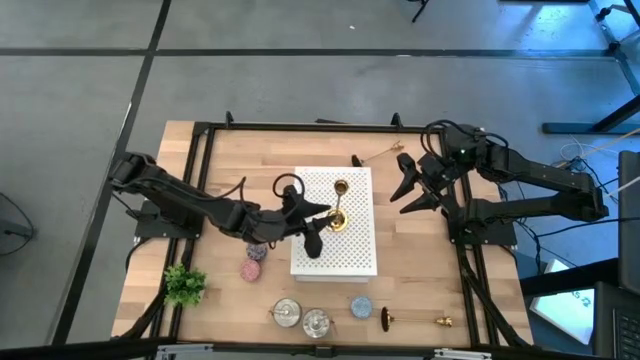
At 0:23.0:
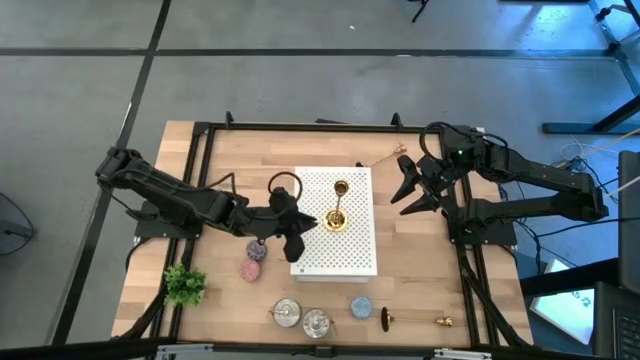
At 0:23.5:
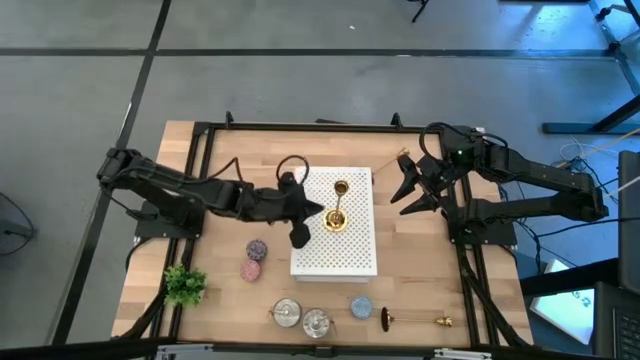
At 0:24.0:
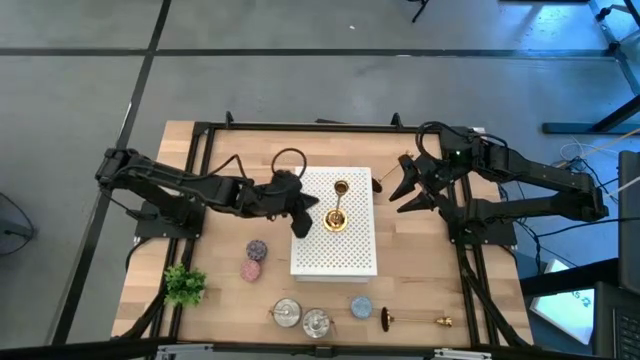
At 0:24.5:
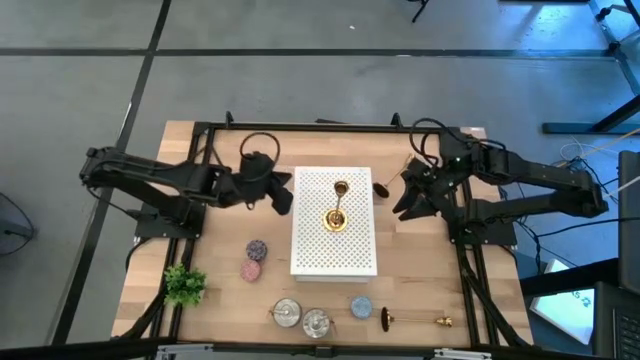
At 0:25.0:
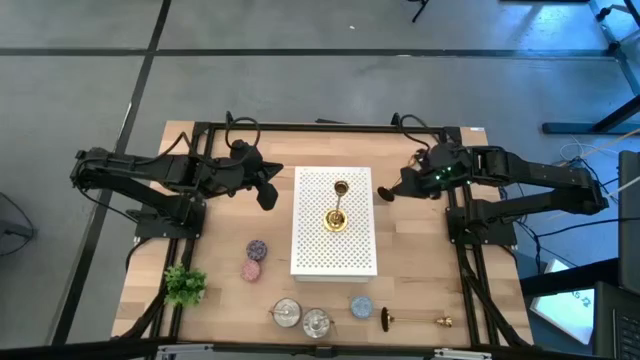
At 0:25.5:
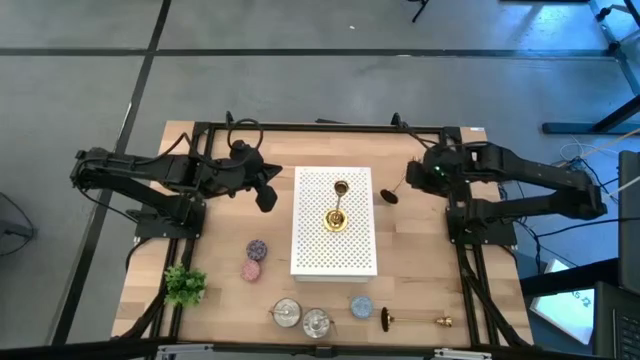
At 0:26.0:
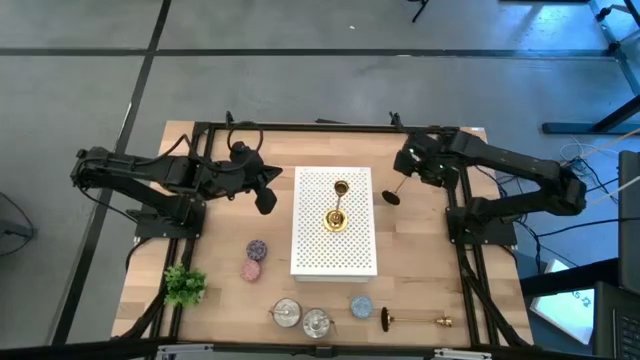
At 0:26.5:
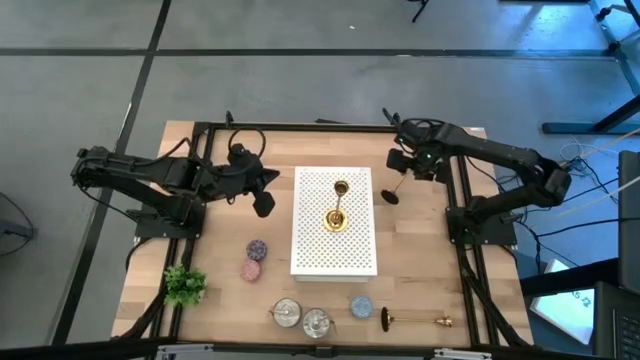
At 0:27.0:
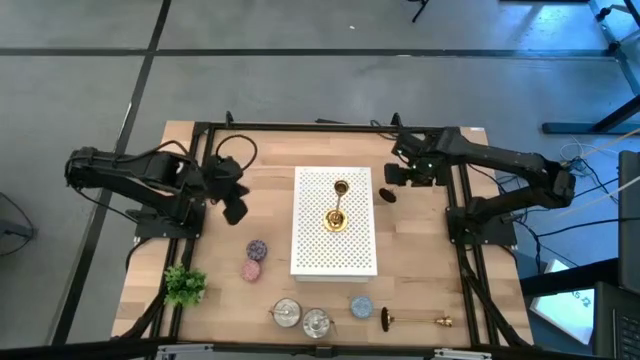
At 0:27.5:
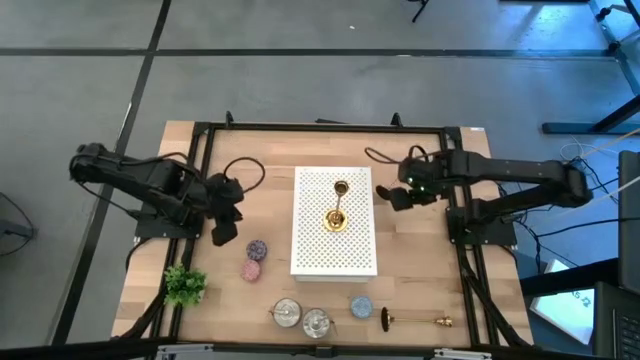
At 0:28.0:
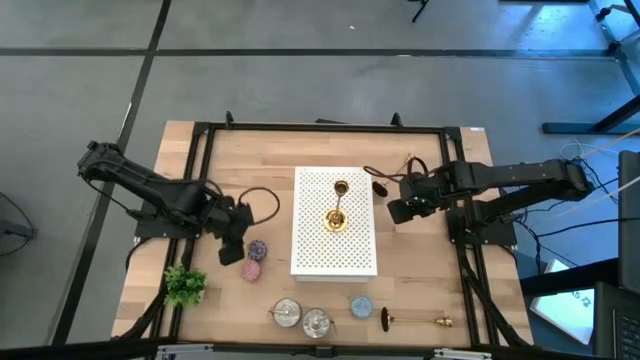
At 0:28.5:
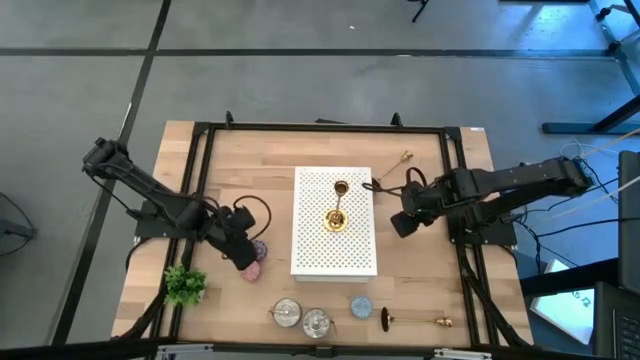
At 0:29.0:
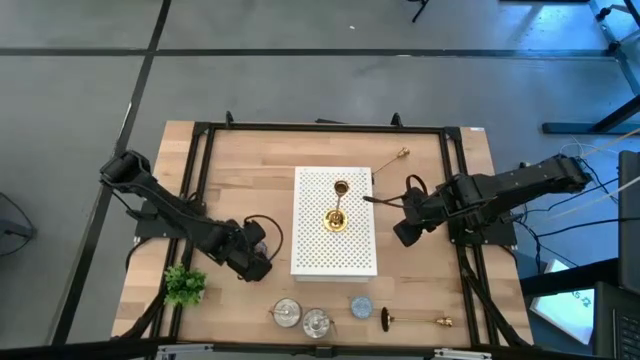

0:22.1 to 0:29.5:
Task: Pick & Place candle stick holders
Put the red patterned scented candle on the shelf

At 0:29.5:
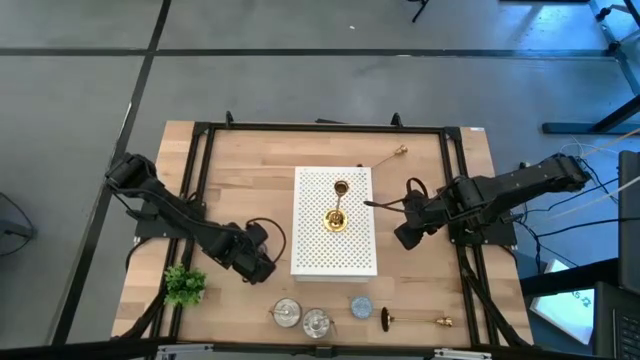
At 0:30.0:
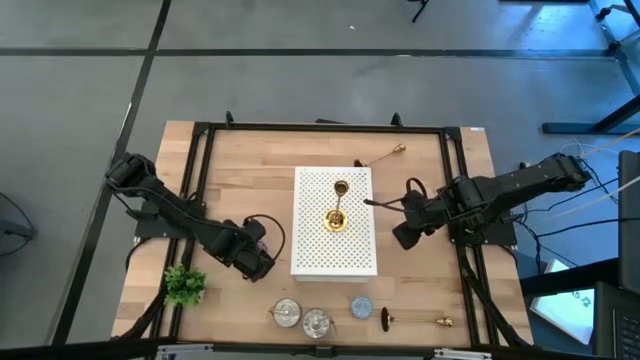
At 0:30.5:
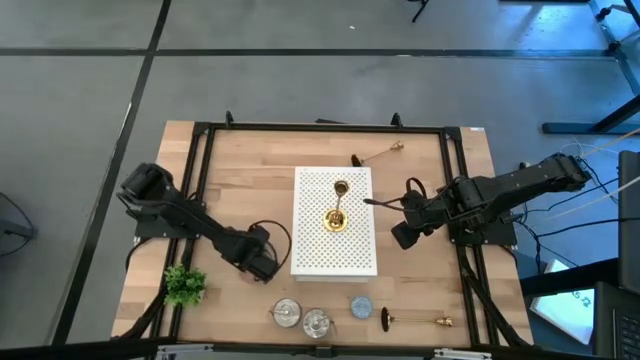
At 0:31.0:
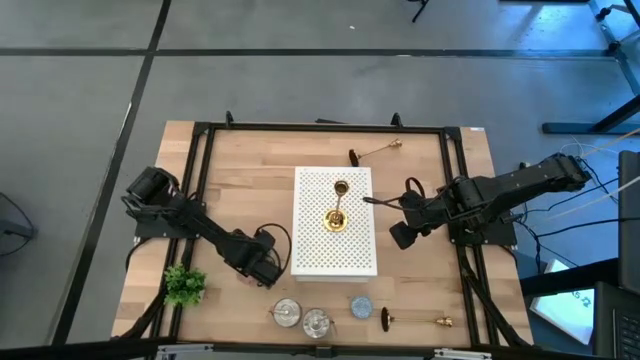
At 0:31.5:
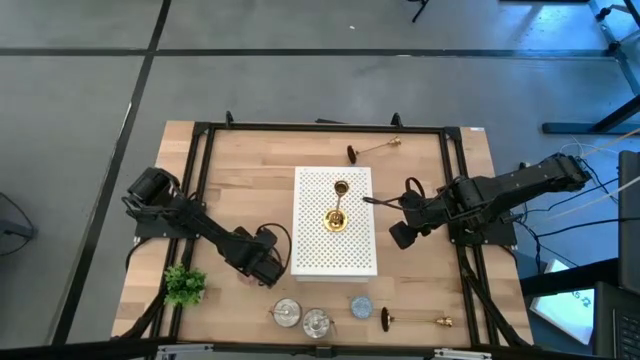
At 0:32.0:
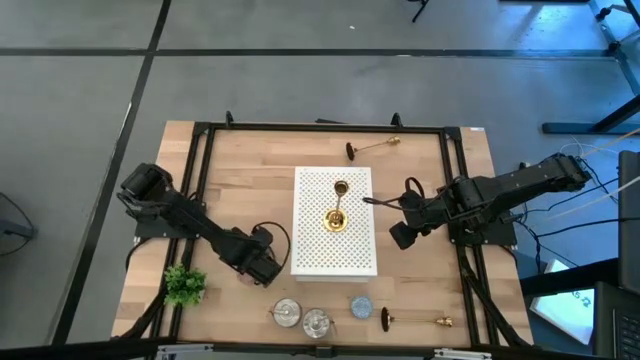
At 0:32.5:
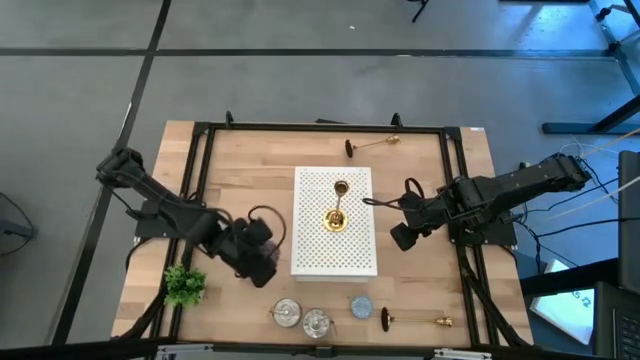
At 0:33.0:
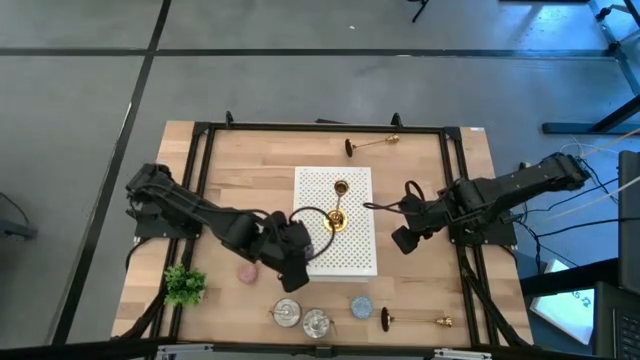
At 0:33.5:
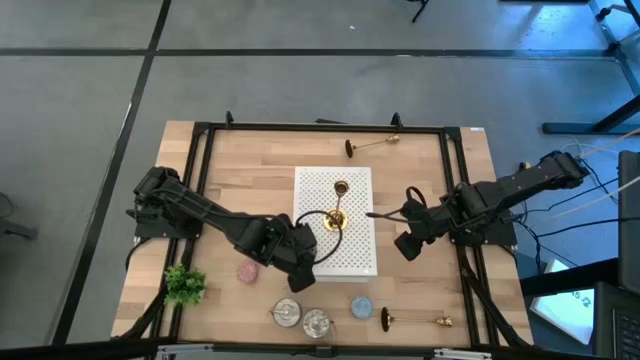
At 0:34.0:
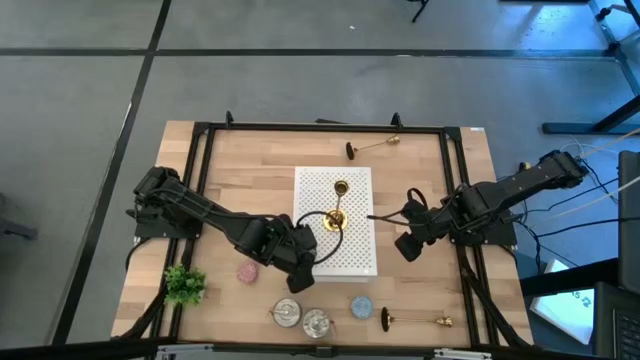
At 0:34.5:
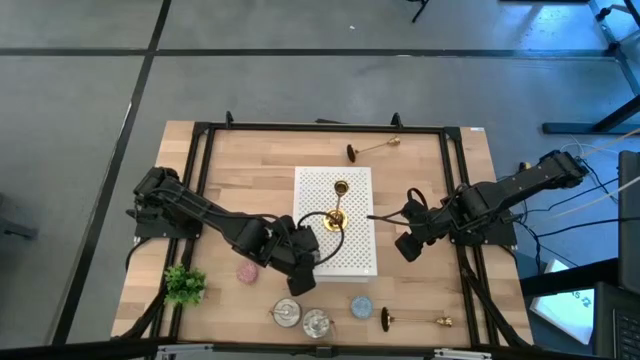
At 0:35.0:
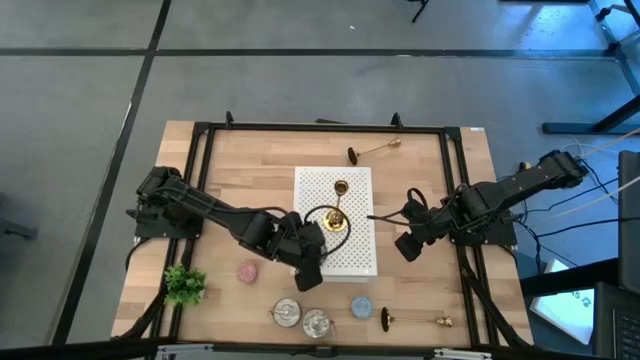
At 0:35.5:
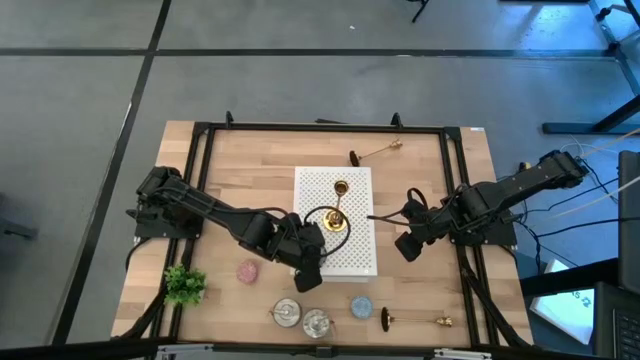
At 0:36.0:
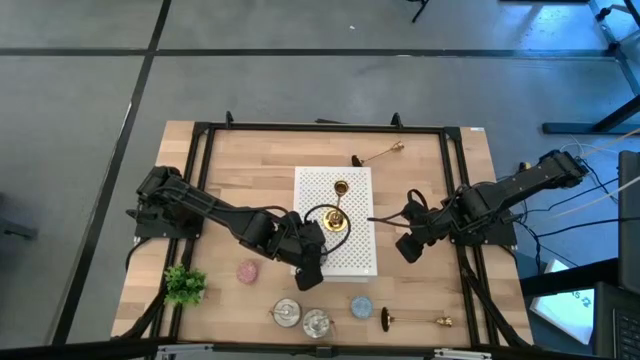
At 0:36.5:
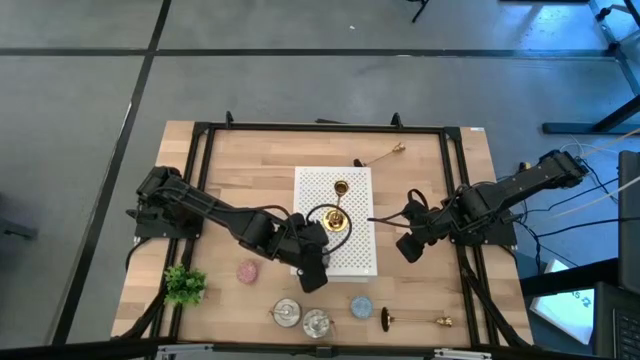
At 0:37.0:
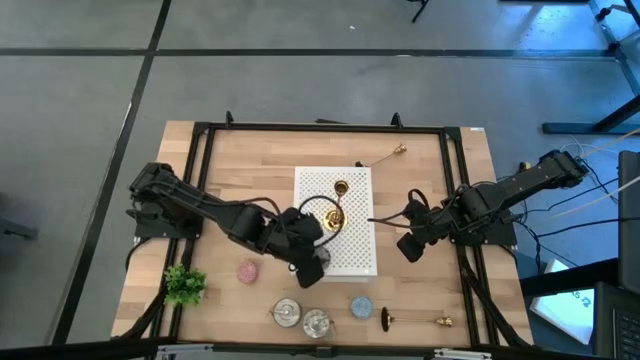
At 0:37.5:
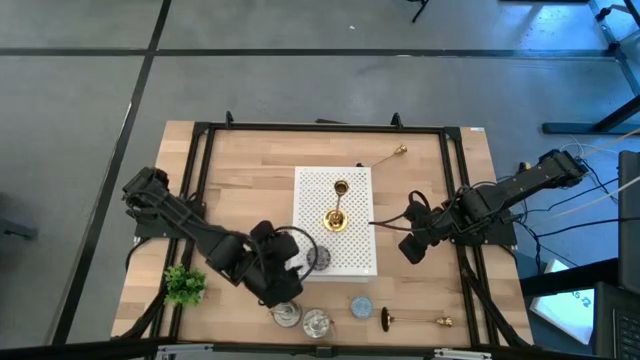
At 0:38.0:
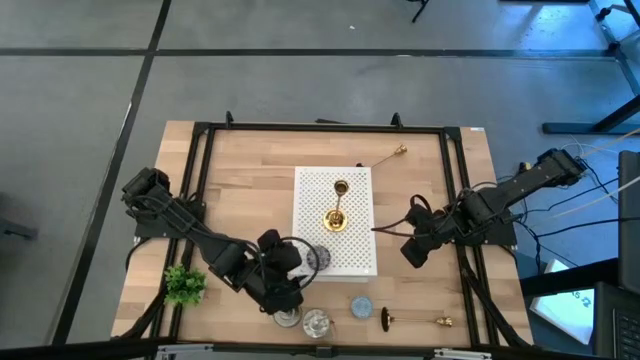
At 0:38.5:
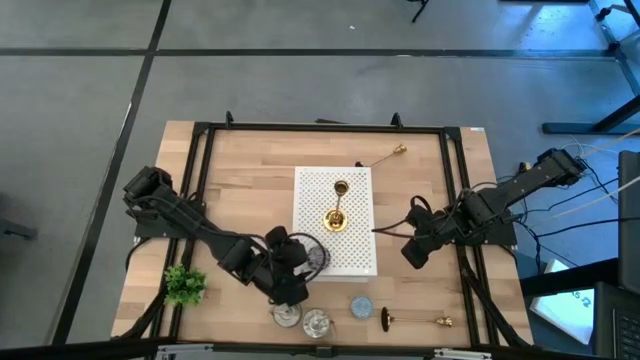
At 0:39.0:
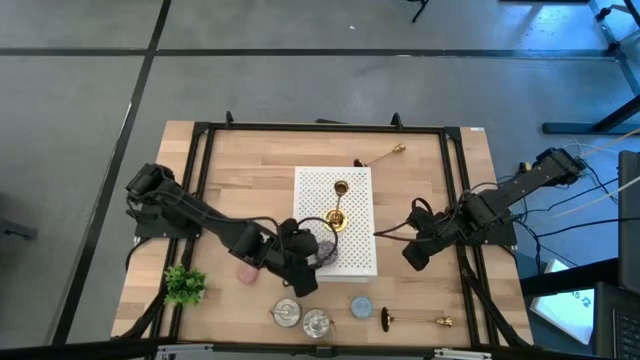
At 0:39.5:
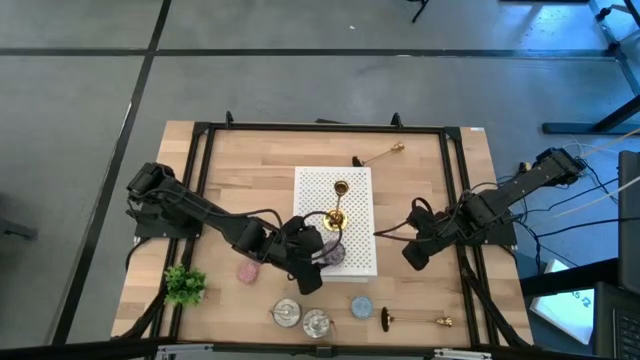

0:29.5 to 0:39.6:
Put the red patterned scented candle on the shelf

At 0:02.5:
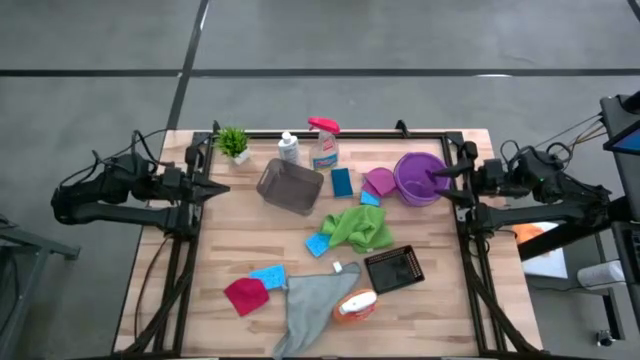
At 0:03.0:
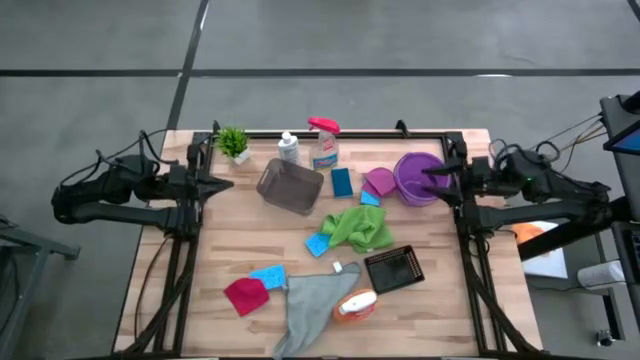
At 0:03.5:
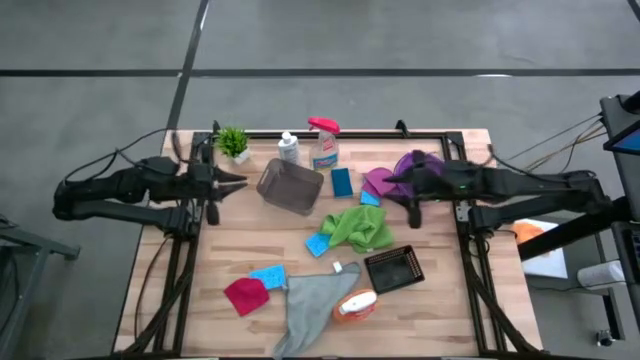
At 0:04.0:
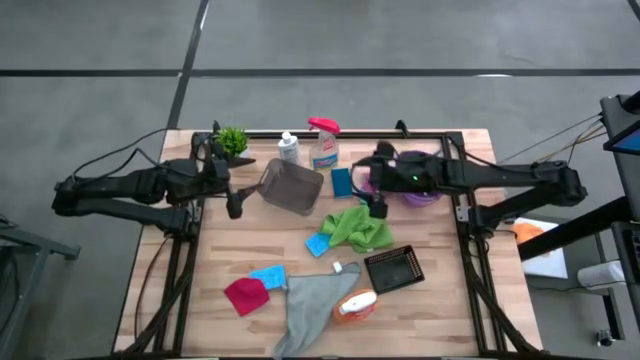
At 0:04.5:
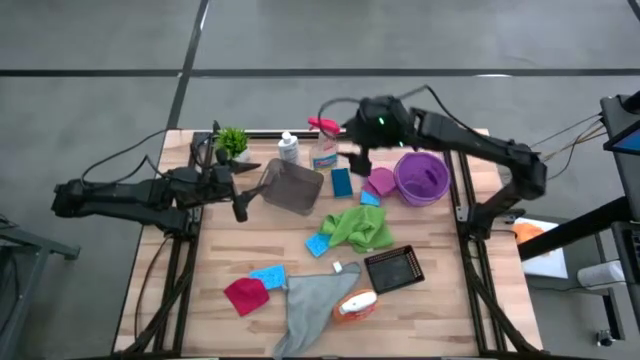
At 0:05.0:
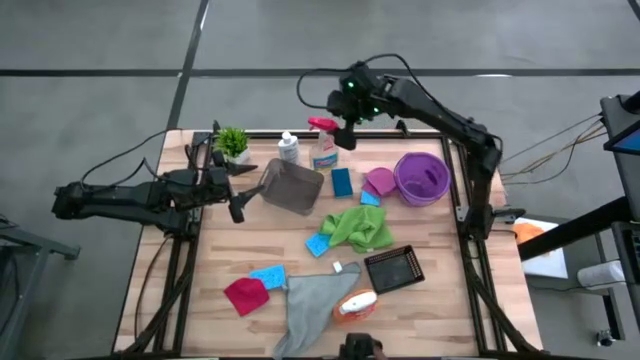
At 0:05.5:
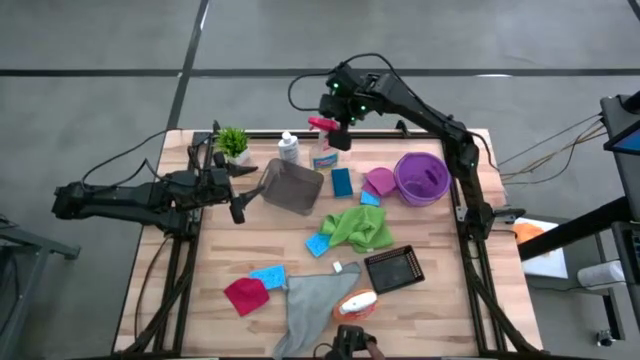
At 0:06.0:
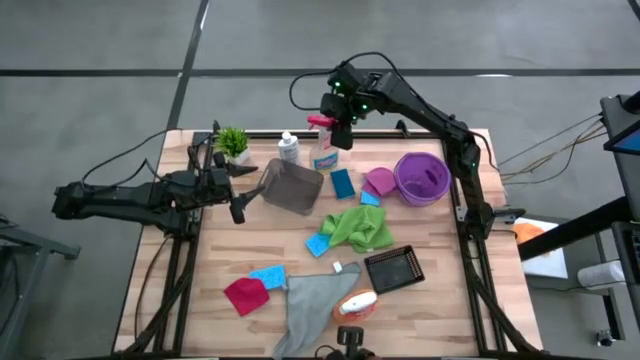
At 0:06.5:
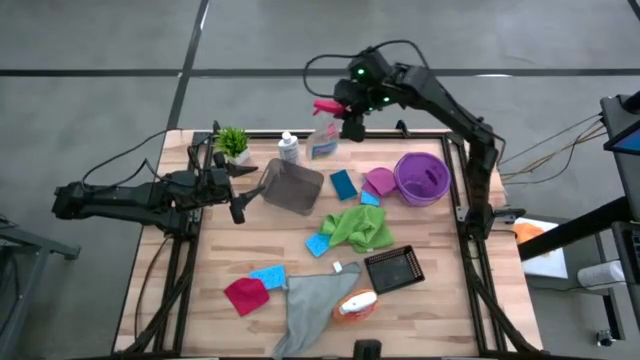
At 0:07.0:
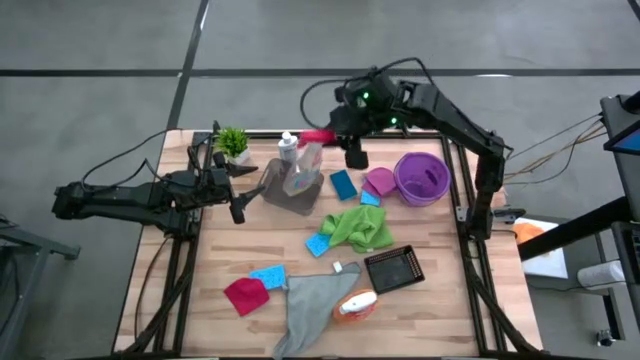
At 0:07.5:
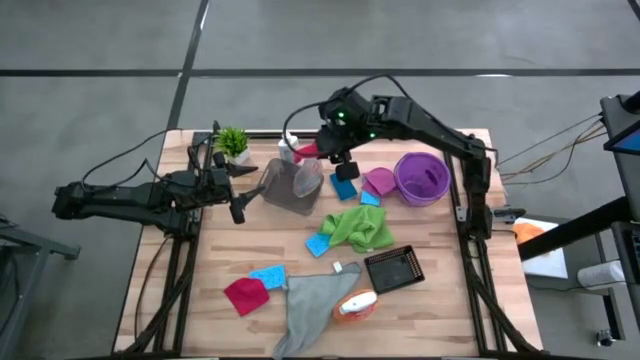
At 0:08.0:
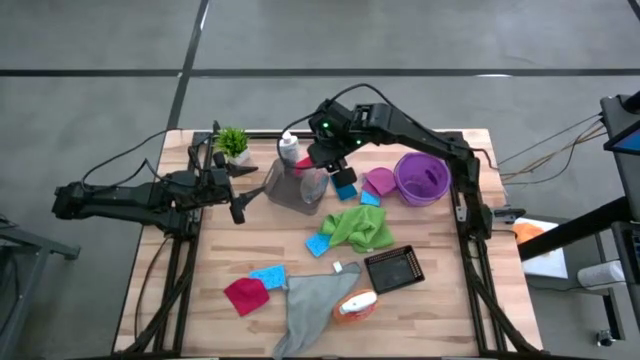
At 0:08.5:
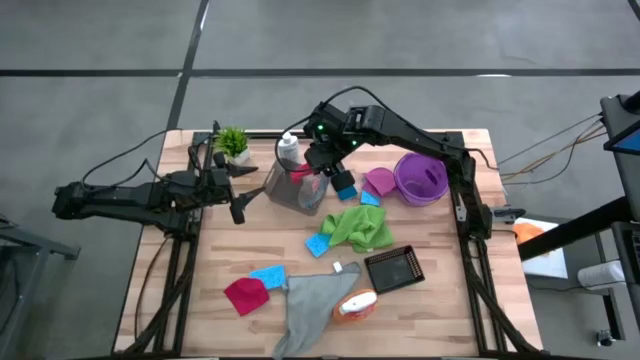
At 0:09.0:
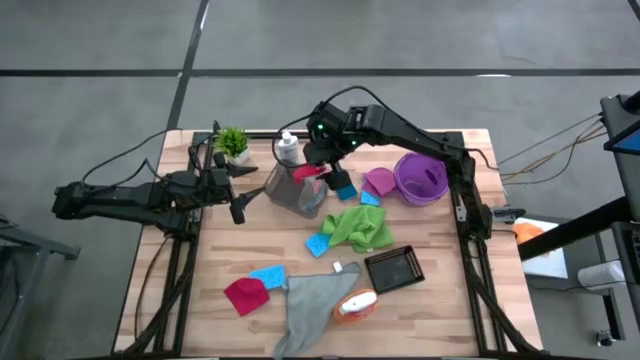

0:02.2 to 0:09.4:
Task: Pick & Place Kitchen Items
Put the red spray bottle into the black bin
